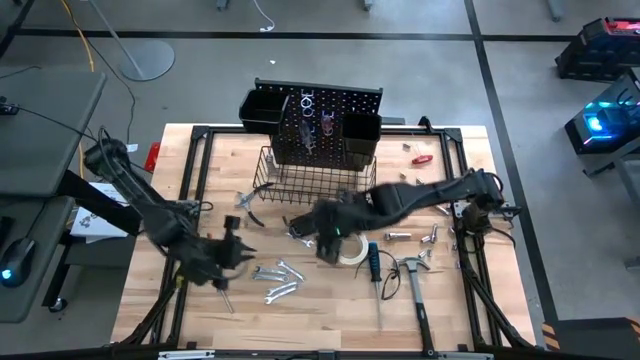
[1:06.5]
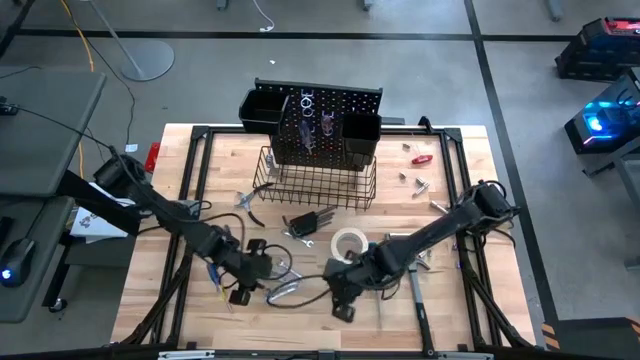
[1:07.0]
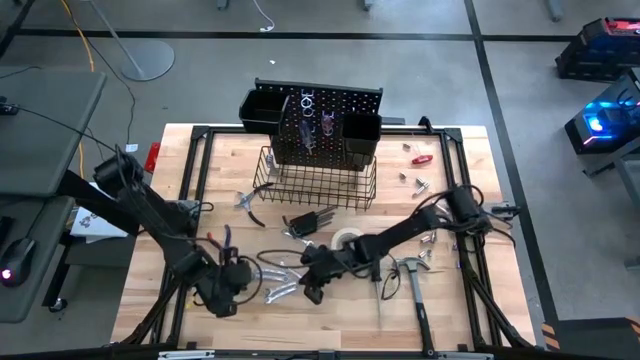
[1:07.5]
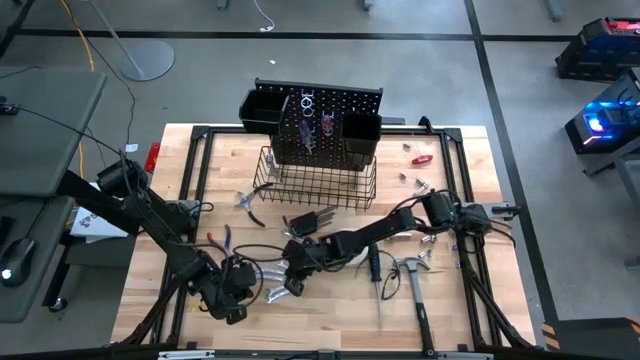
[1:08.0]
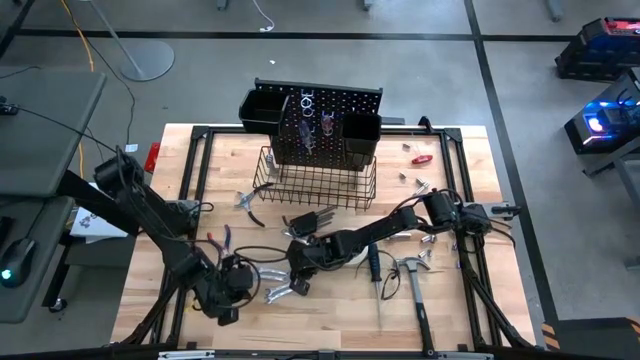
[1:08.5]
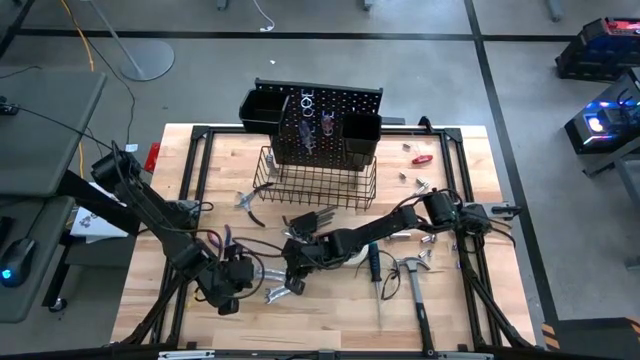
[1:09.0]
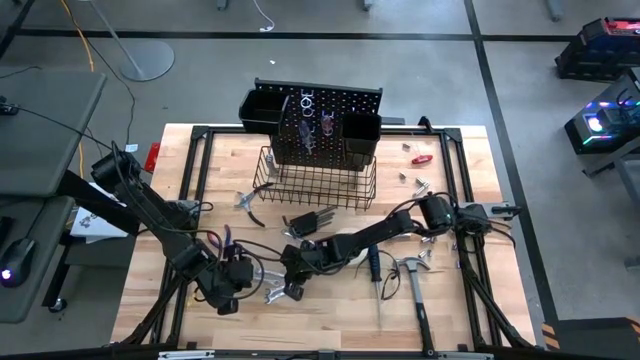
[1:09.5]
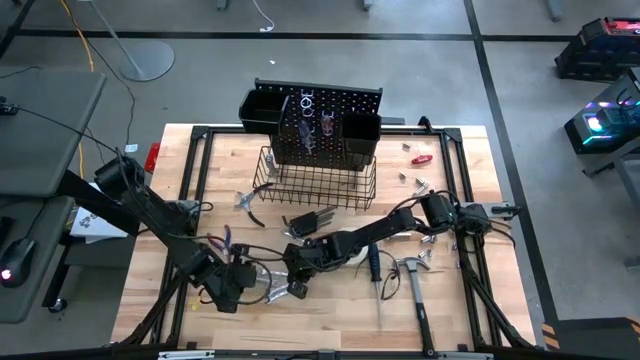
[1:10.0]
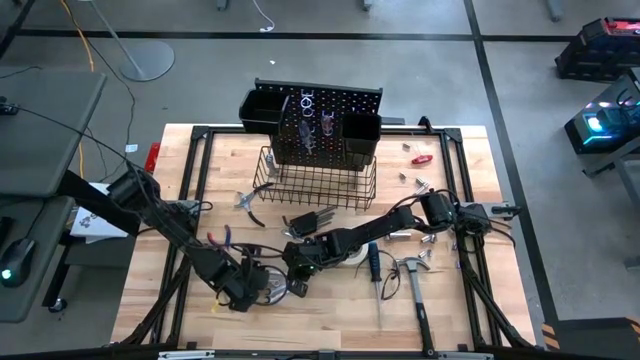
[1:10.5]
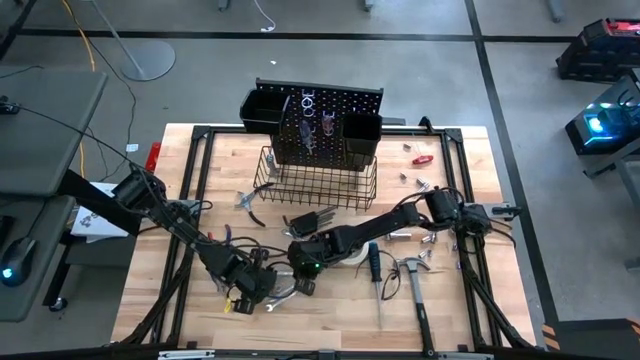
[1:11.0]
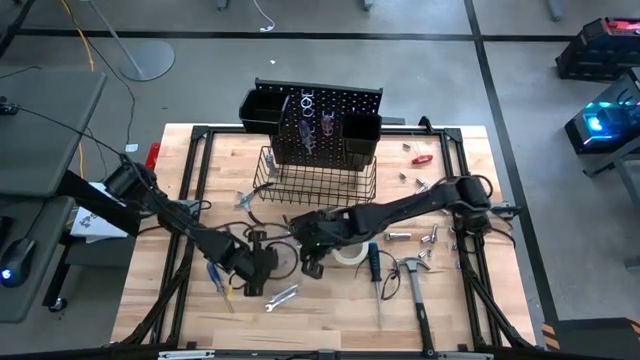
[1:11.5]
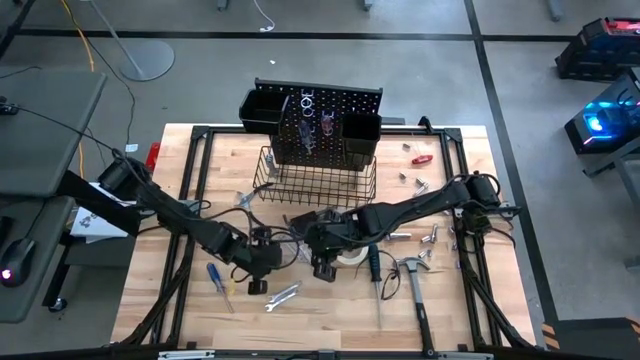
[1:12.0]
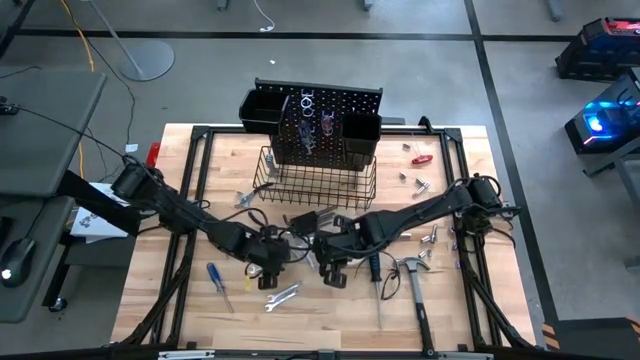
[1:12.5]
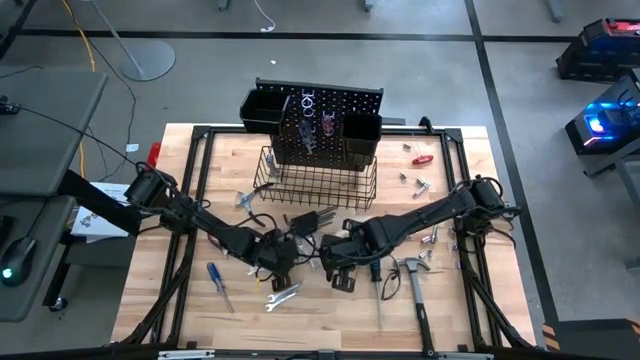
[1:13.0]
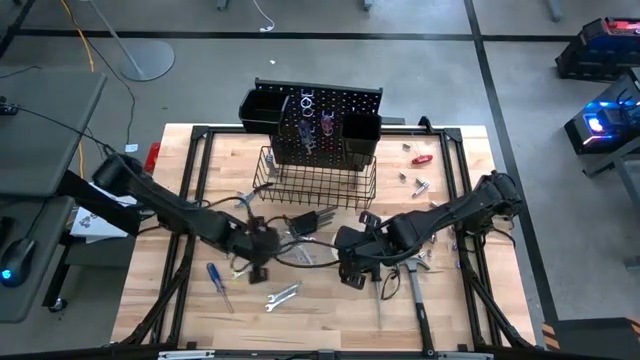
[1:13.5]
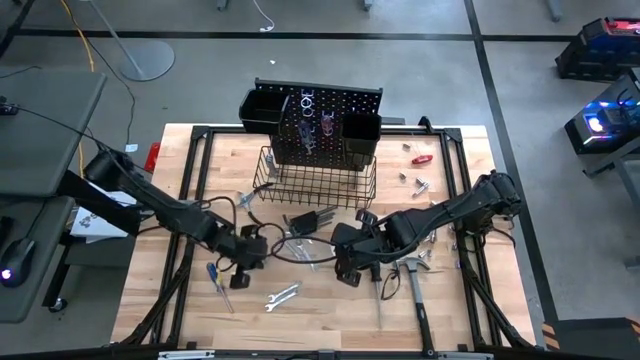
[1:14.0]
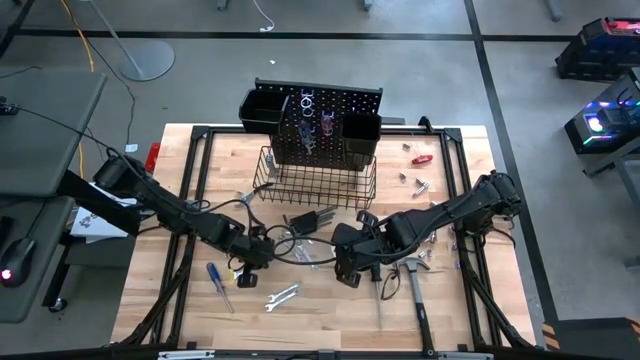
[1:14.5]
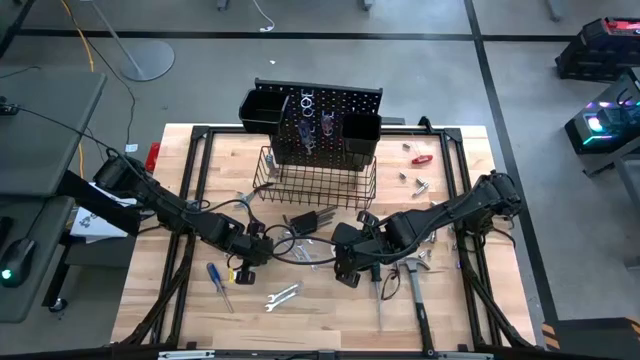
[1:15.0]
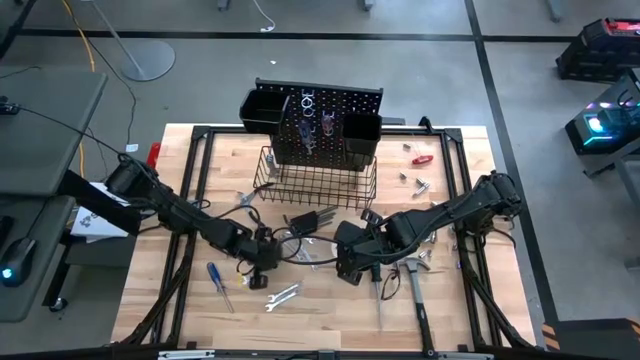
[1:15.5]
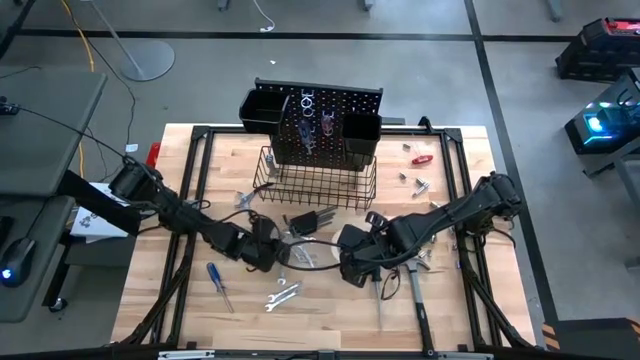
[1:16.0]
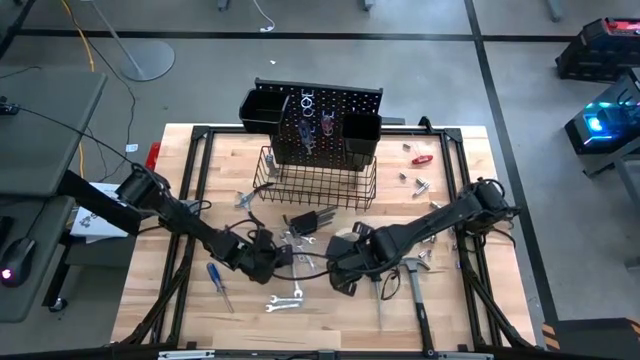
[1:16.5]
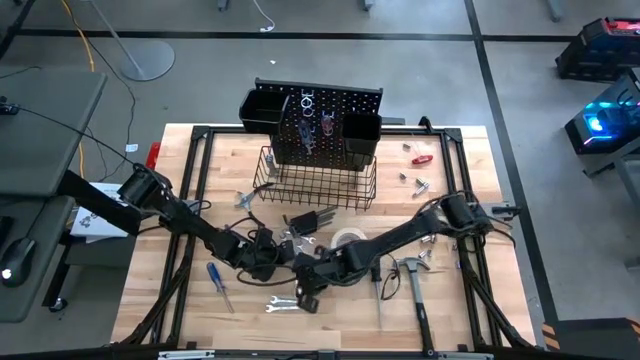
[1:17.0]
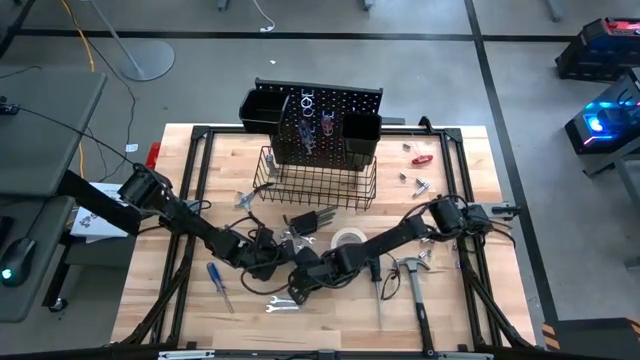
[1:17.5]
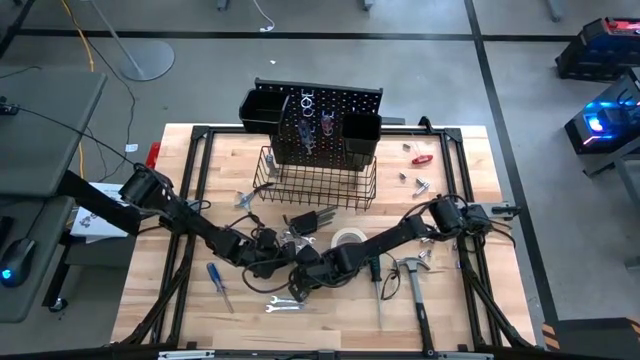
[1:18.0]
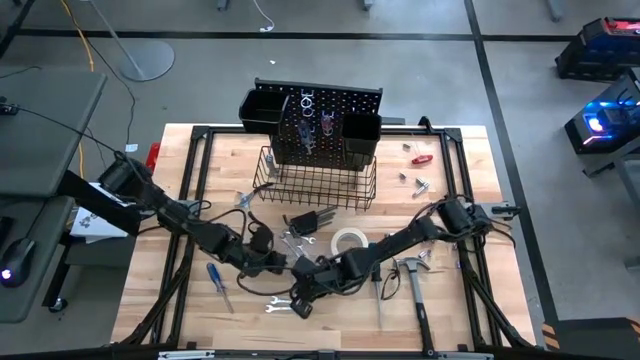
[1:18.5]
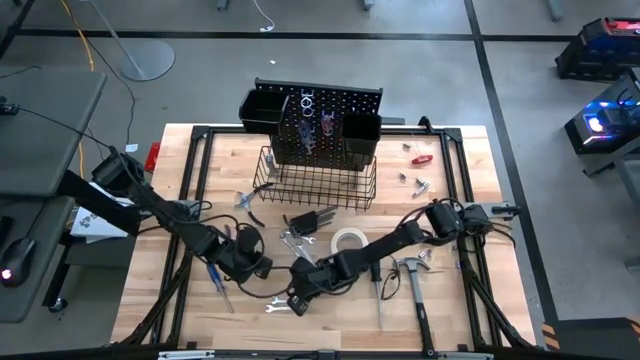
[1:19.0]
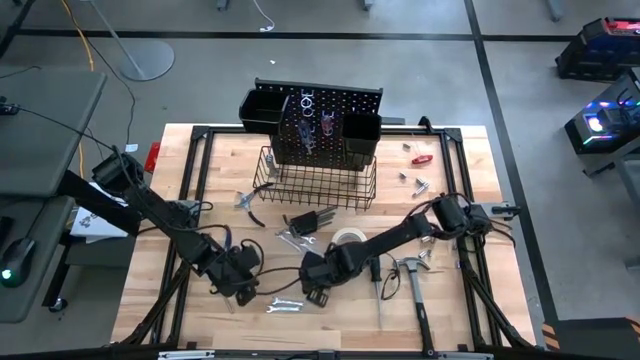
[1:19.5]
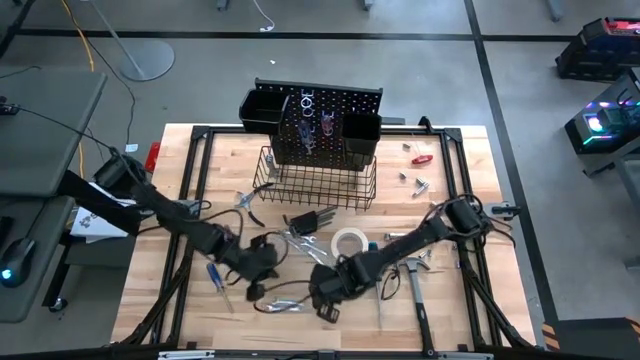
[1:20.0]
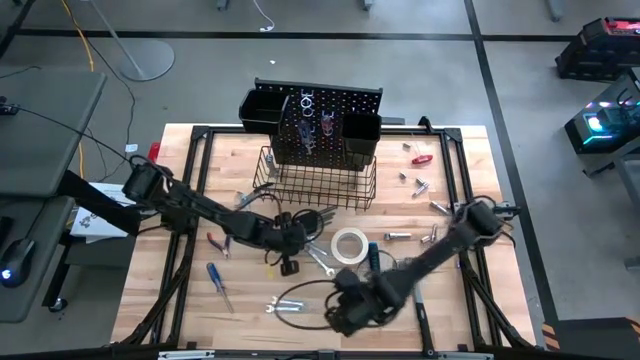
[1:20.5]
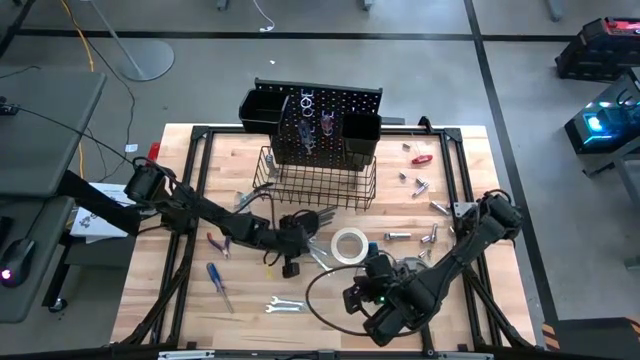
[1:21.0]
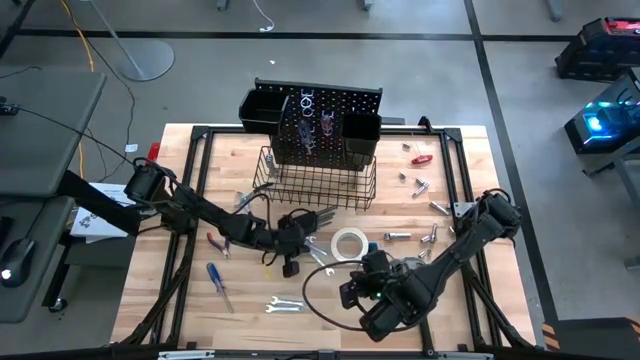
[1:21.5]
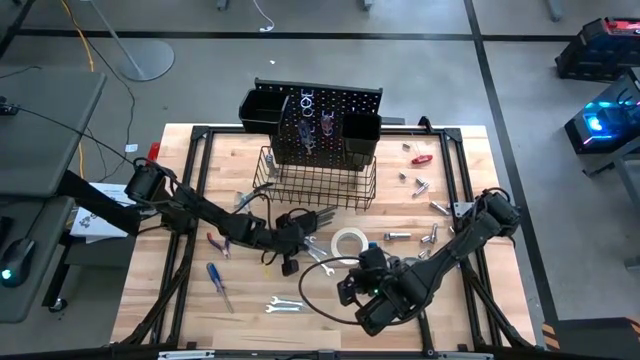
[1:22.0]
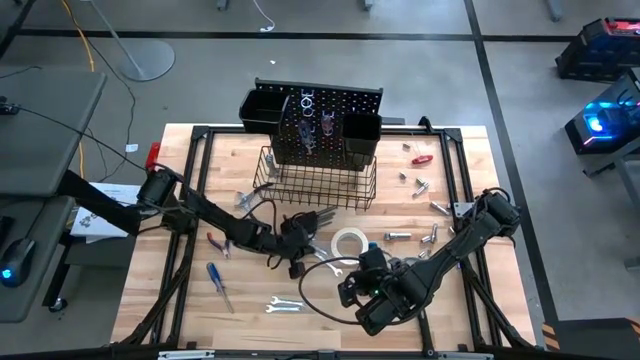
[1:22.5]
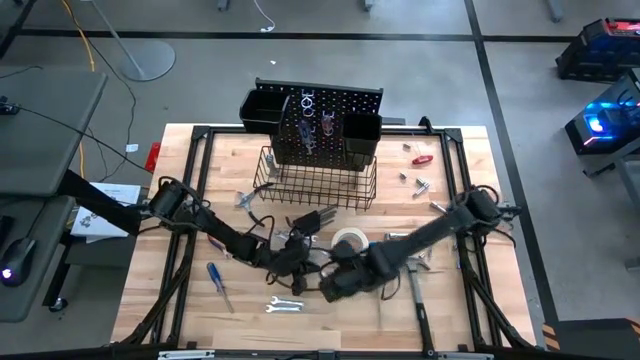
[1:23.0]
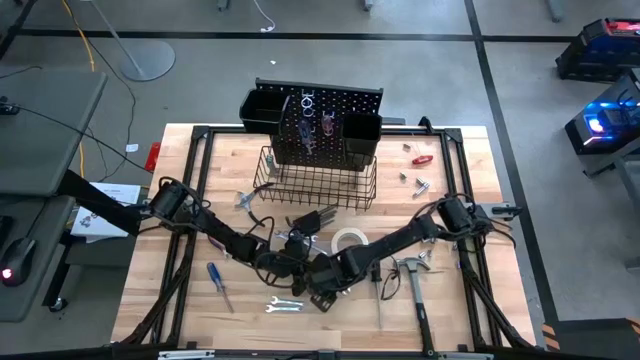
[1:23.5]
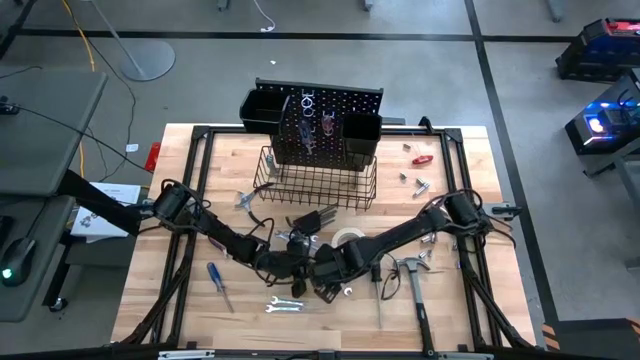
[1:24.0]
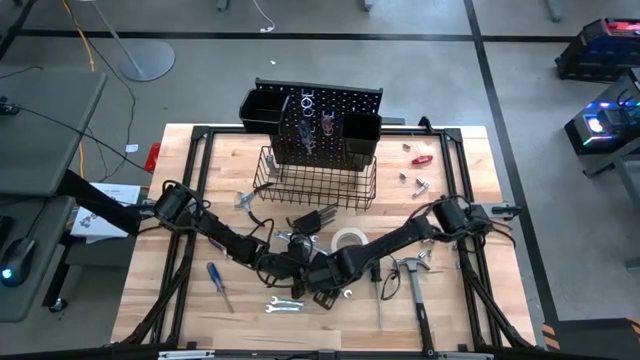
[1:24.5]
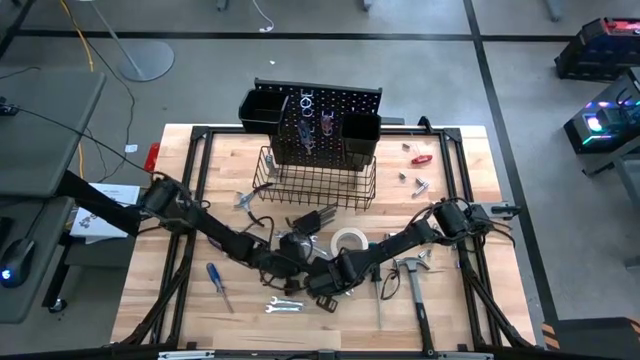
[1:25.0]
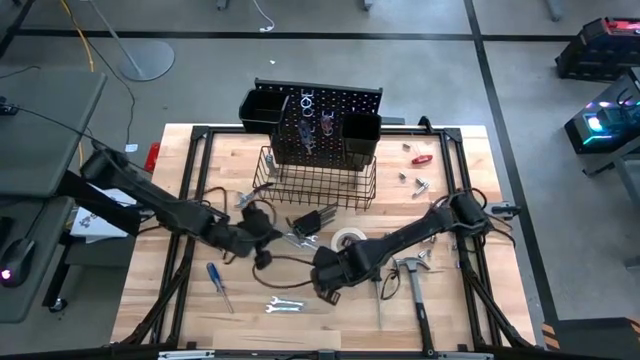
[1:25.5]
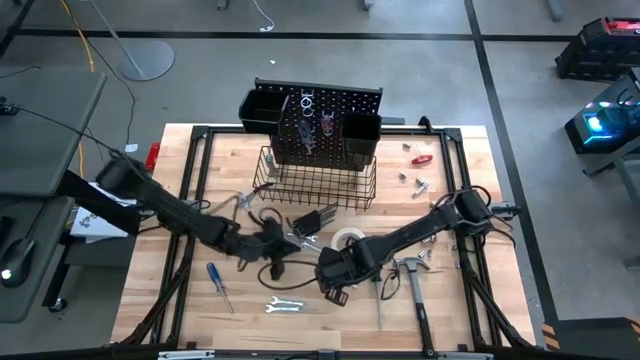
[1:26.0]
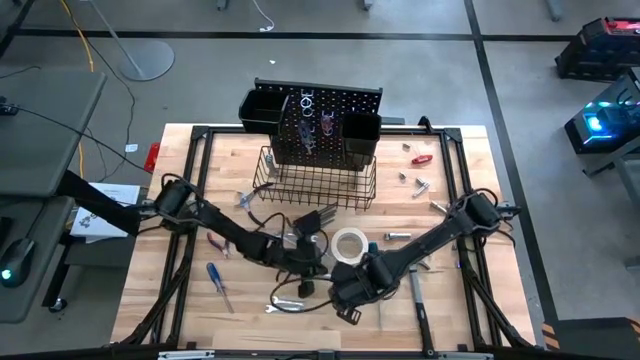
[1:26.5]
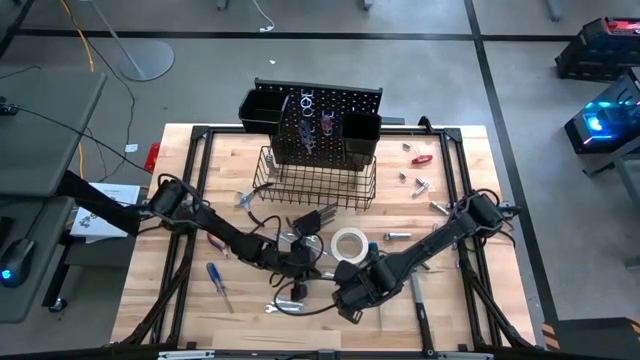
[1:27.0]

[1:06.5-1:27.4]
Task: Hang tools onto peg board
Hang the wrench on the peg board
